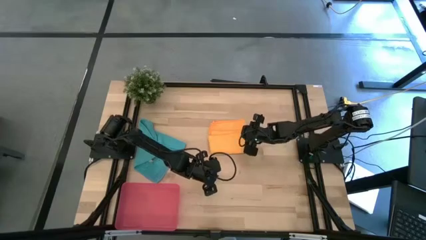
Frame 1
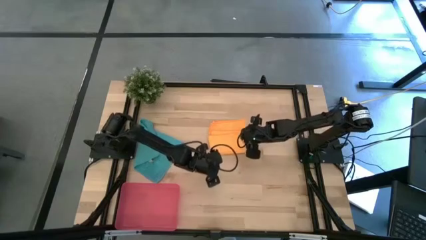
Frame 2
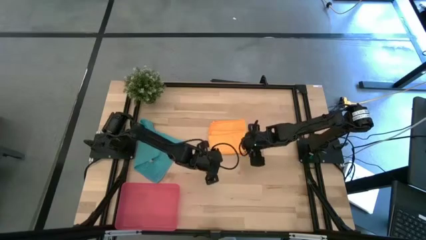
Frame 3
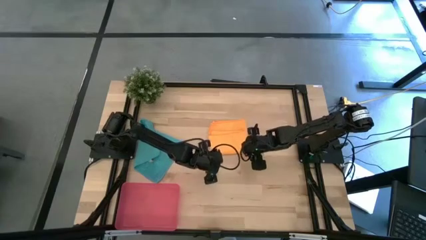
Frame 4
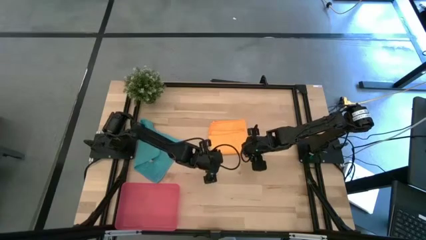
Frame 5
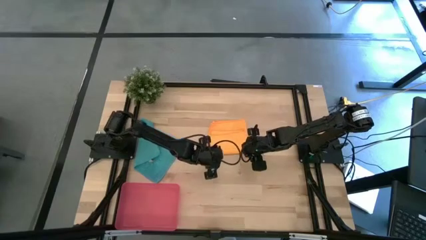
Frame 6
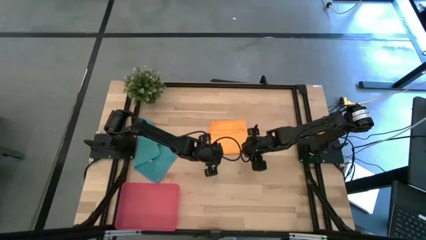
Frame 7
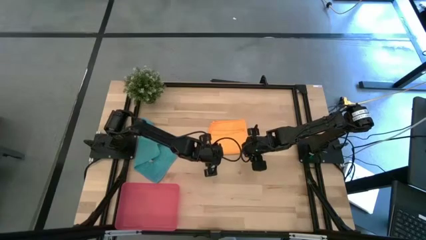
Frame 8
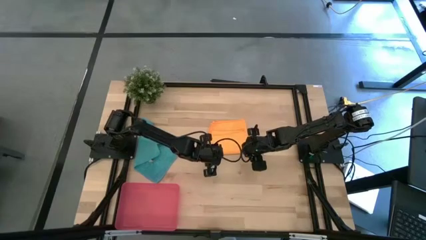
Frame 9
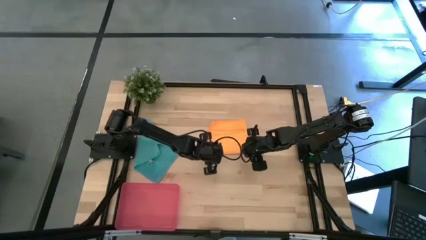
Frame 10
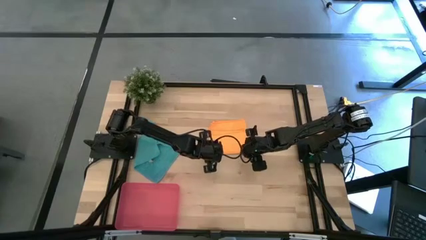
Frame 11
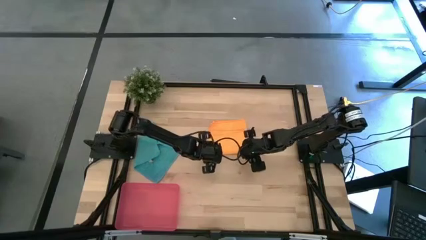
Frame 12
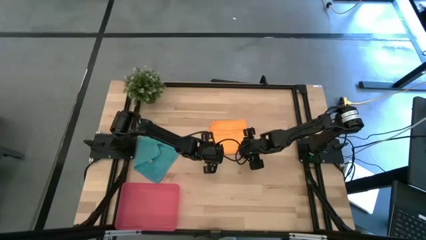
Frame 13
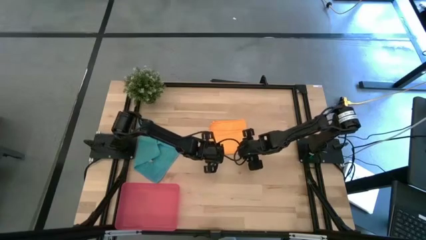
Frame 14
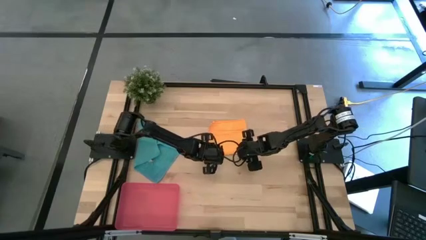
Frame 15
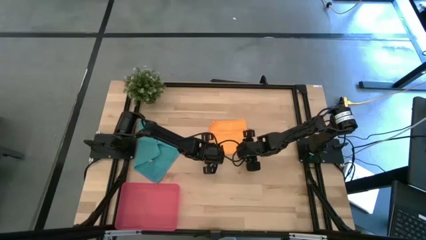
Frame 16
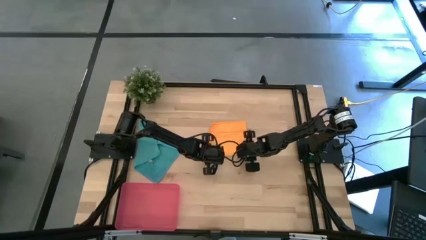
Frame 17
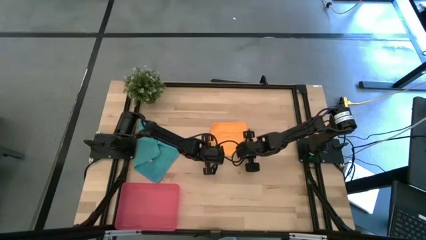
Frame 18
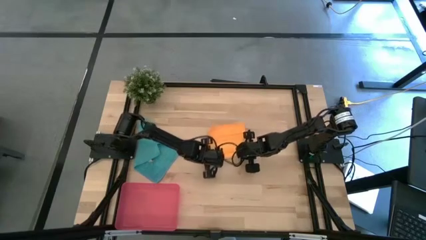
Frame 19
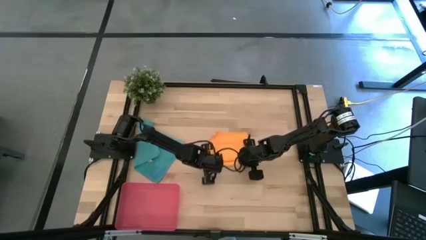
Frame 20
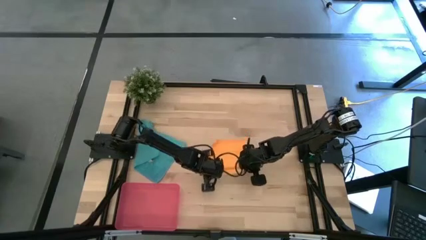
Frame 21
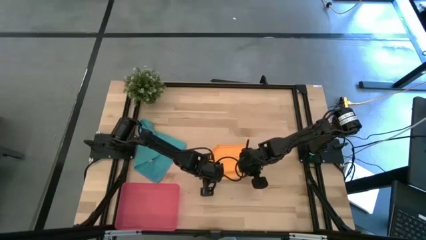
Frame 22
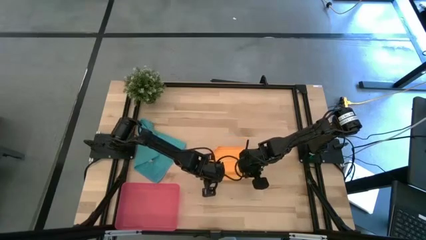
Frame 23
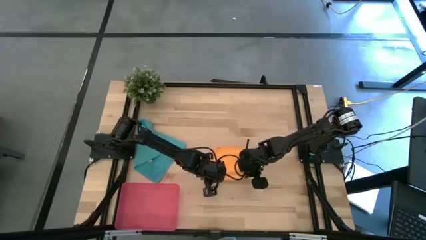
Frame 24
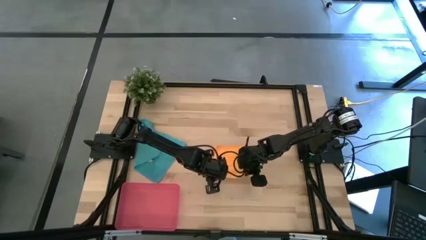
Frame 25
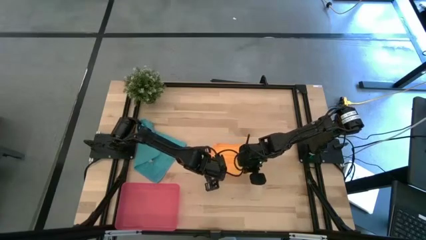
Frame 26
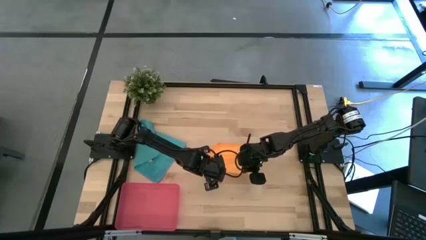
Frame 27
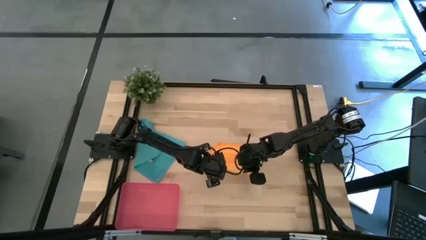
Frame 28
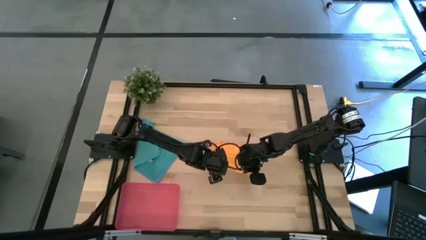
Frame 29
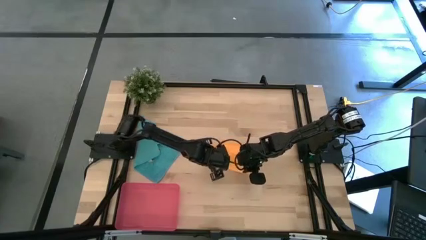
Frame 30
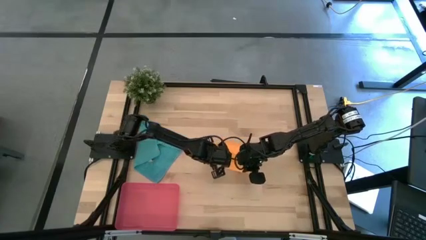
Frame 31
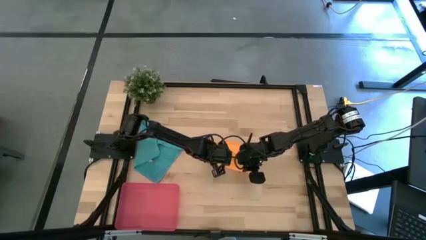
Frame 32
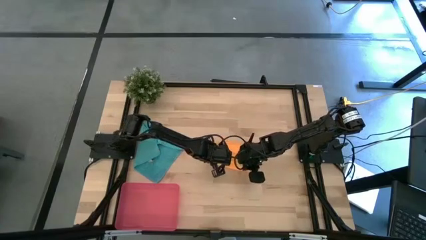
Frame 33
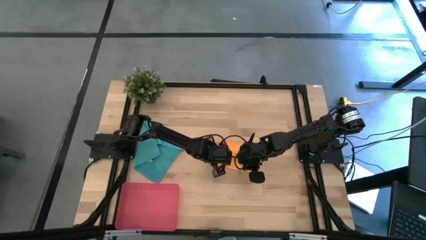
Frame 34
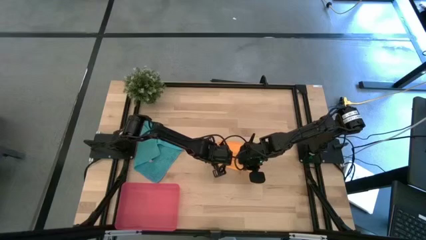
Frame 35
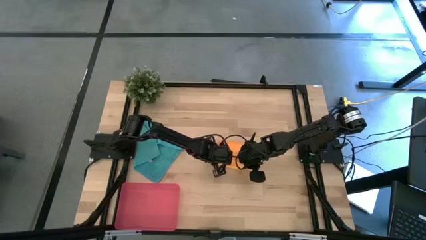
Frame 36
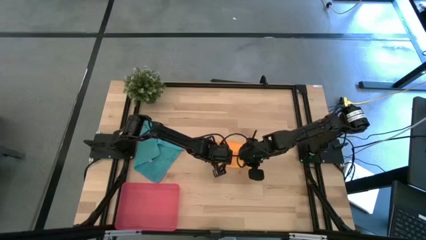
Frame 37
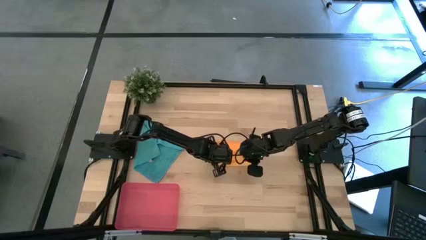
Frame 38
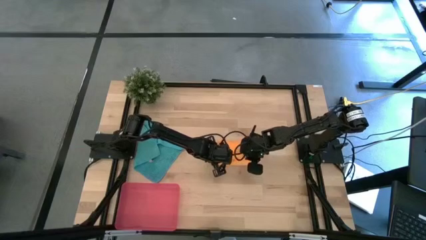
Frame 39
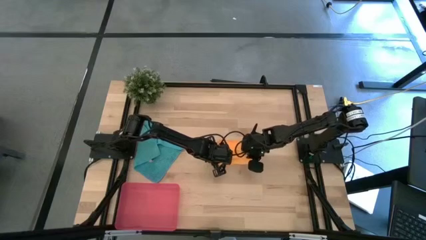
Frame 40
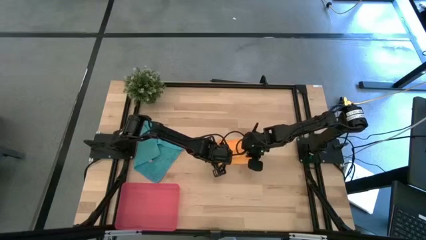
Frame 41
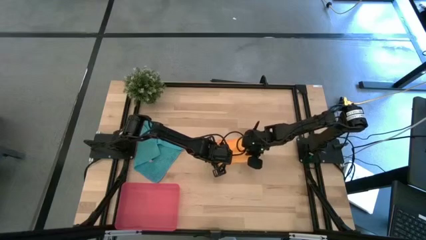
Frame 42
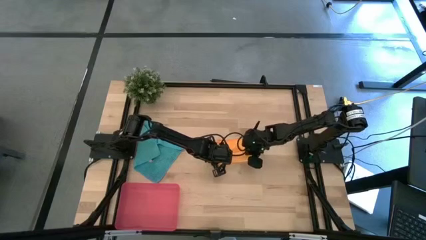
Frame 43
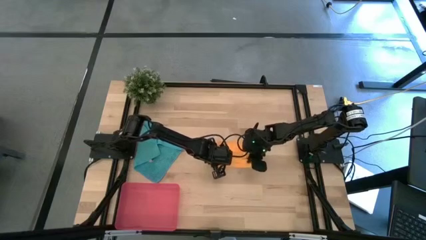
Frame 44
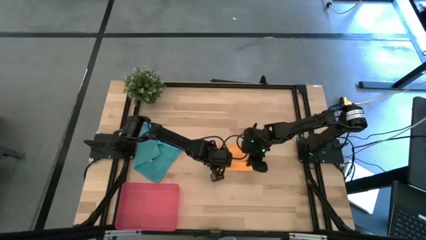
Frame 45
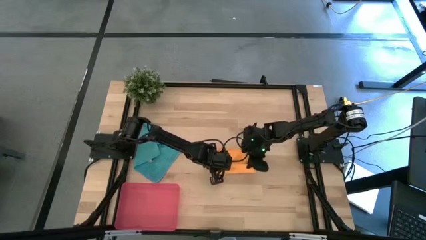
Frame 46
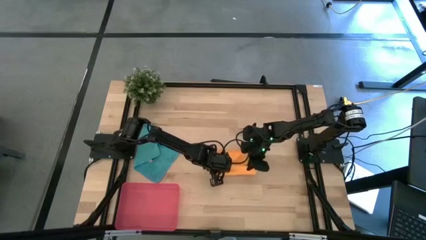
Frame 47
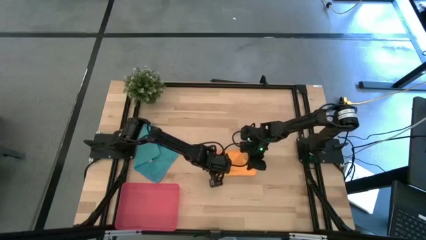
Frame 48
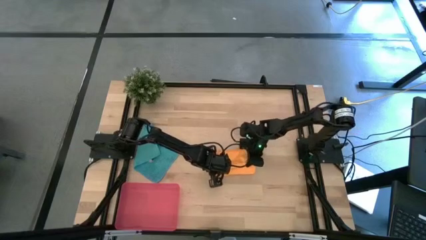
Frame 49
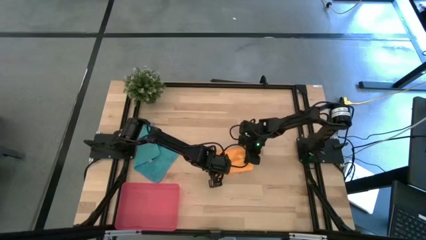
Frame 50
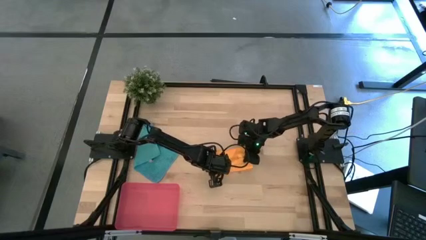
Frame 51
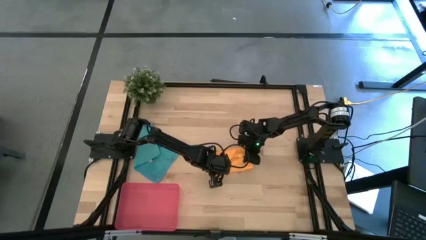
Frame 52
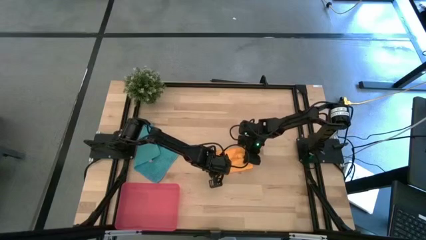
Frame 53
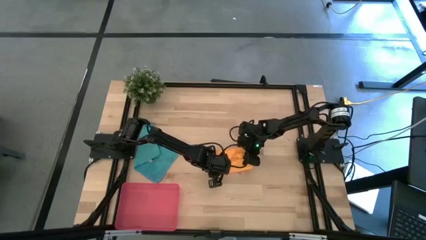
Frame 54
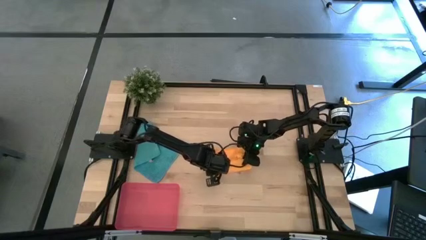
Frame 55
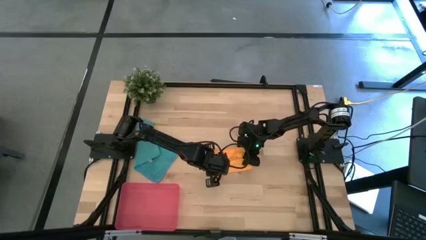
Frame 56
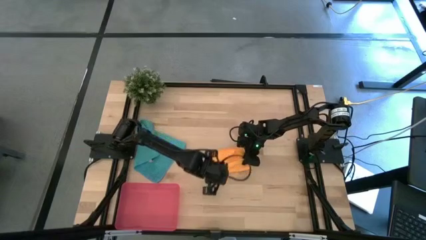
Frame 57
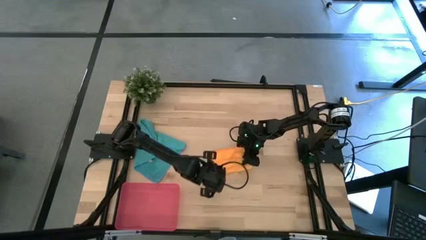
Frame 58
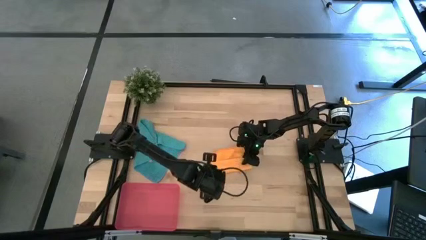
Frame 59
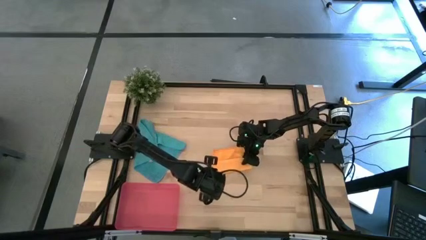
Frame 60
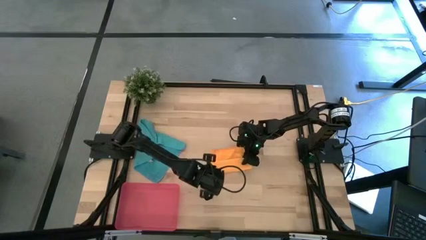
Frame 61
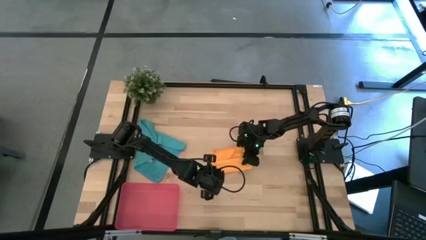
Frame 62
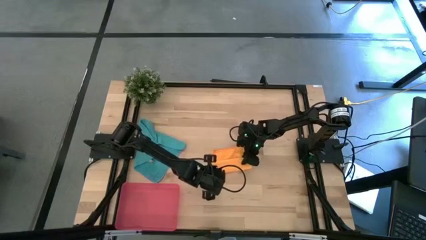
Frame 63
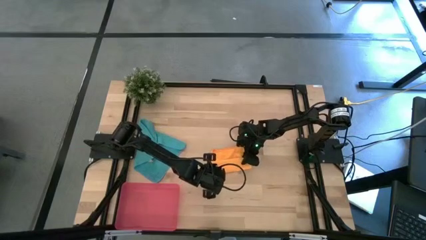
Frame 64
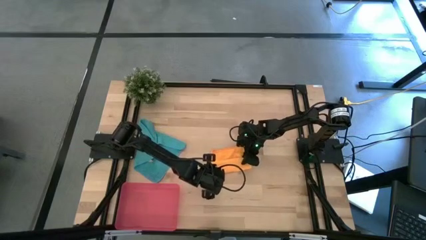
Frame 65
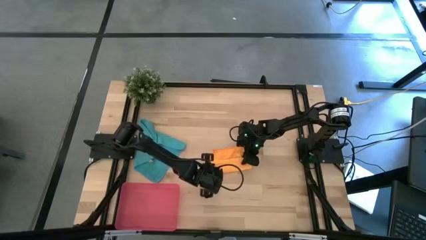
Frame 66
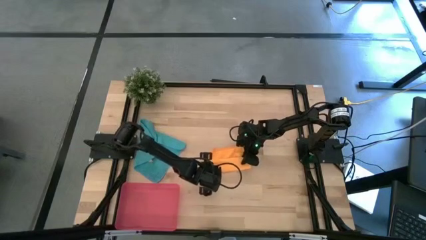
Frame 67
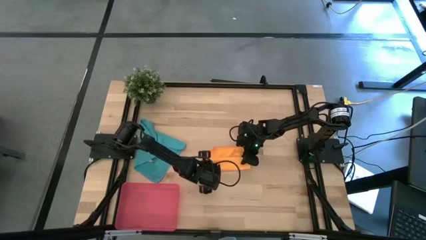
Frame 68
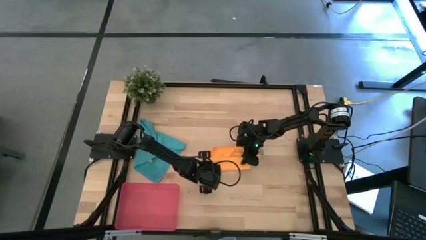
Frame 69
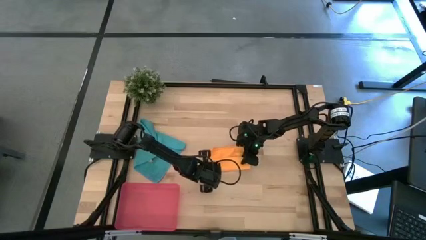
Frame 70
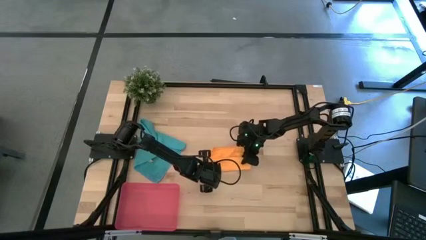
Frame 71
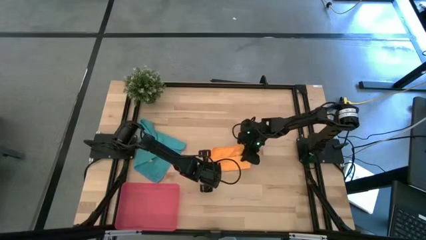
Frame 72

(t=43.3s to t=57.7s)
Task: Roll microfiber towels into tight, uniform cylinder then place into a basket
Roll the yellow microfiber cloth
